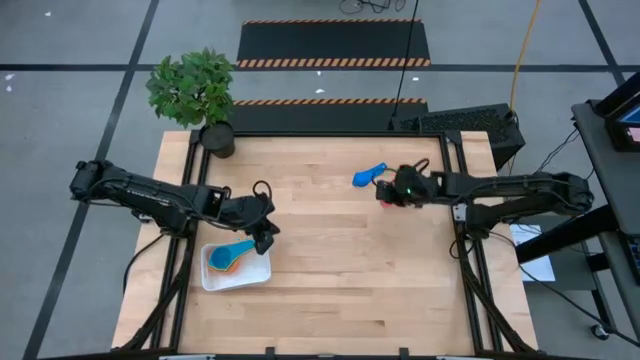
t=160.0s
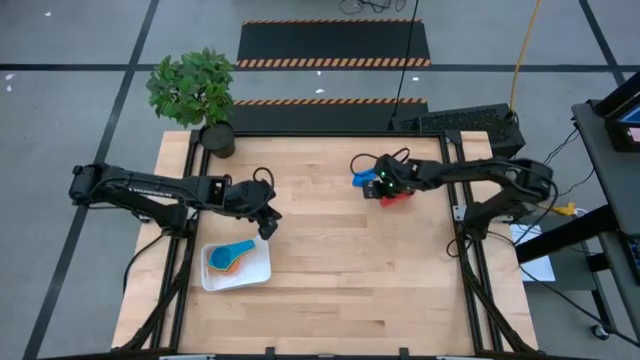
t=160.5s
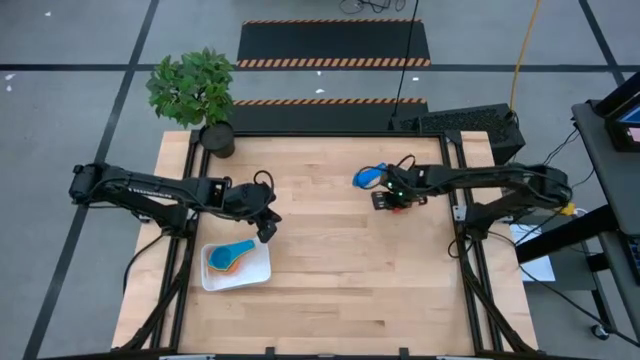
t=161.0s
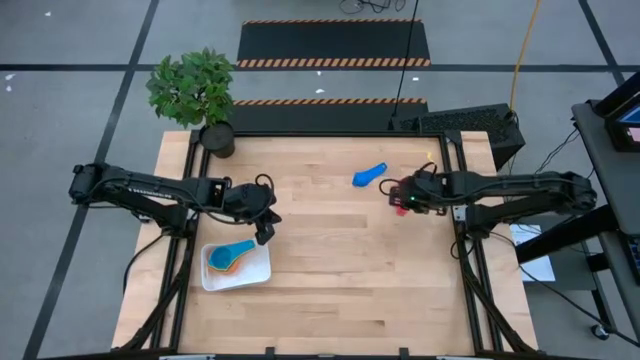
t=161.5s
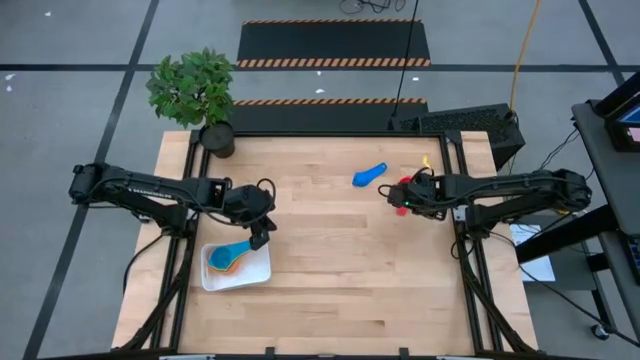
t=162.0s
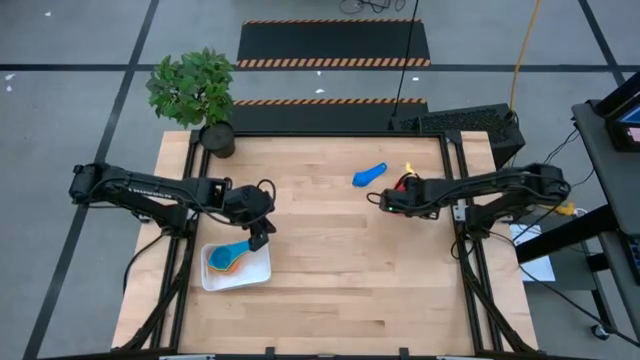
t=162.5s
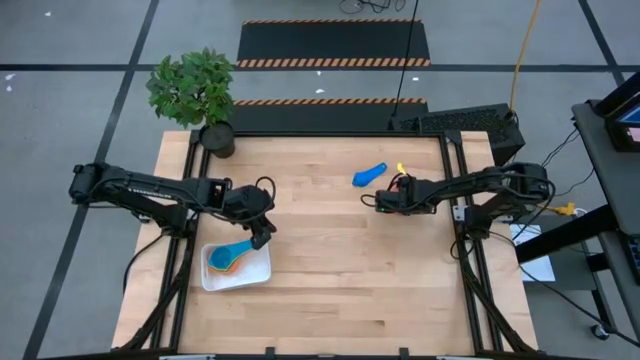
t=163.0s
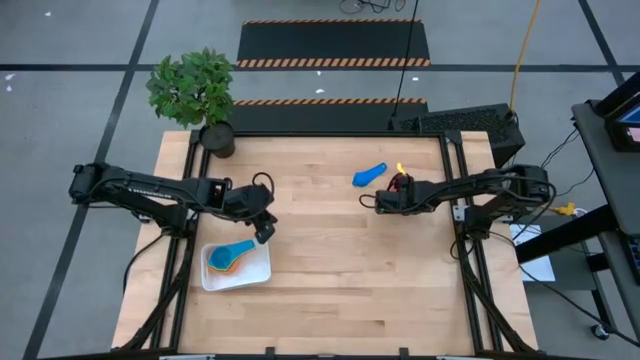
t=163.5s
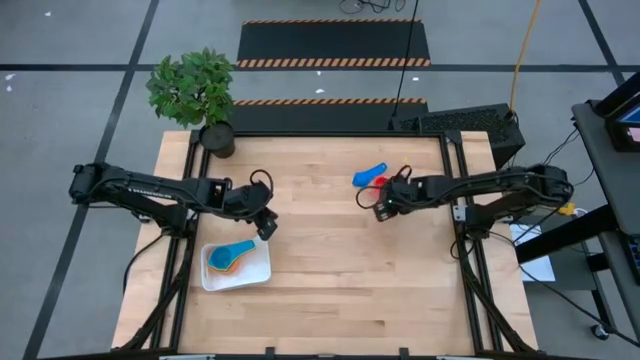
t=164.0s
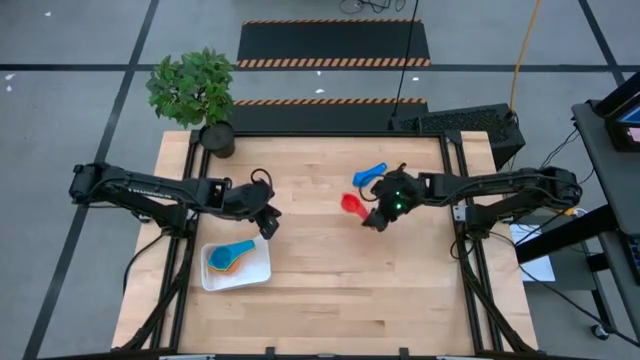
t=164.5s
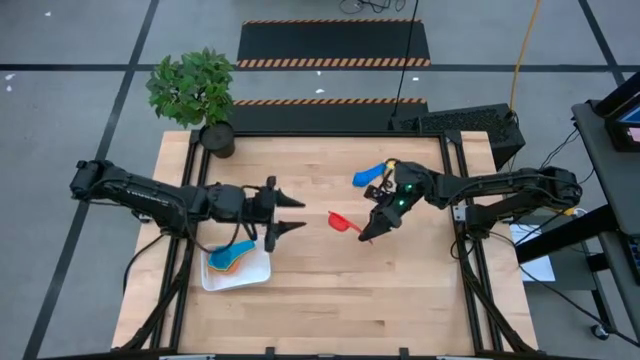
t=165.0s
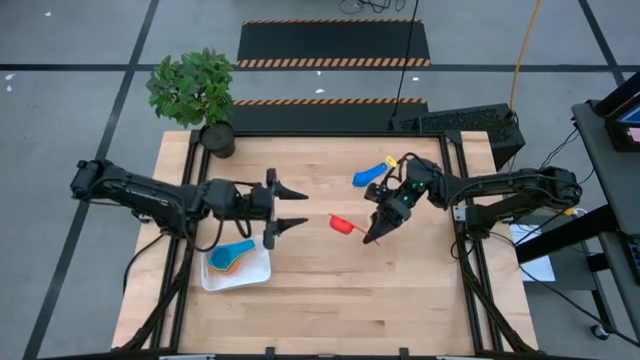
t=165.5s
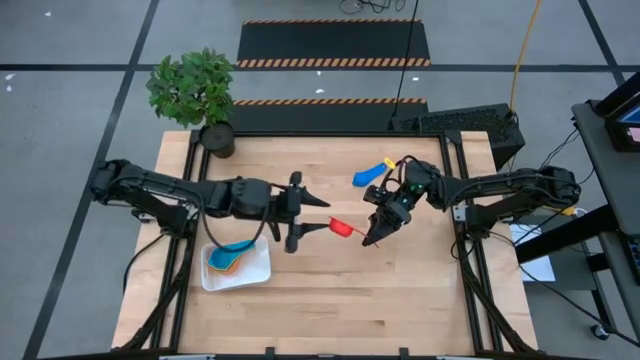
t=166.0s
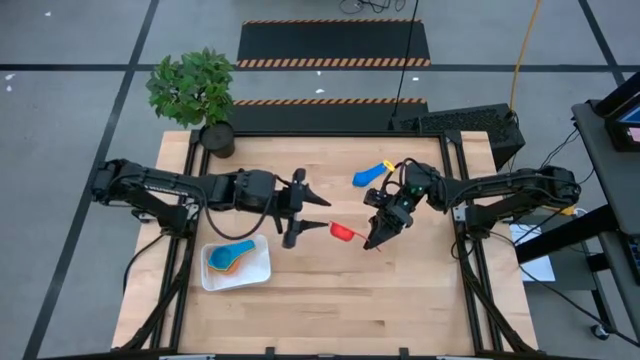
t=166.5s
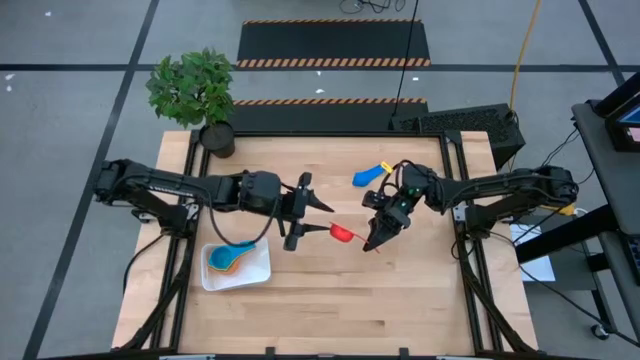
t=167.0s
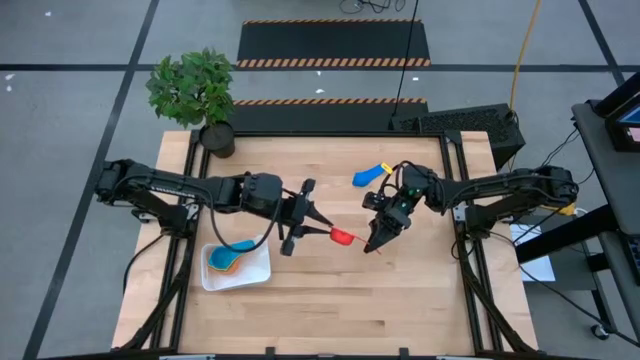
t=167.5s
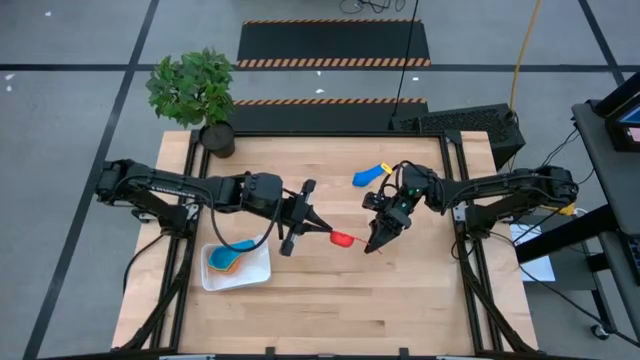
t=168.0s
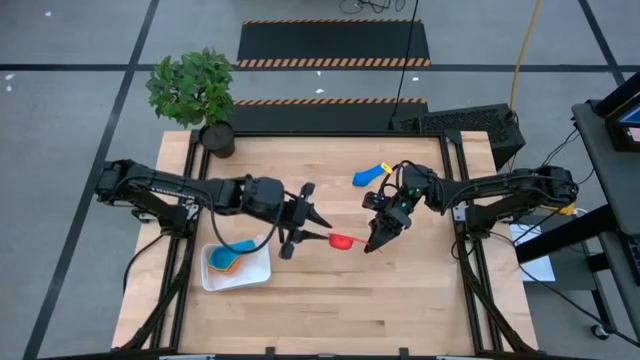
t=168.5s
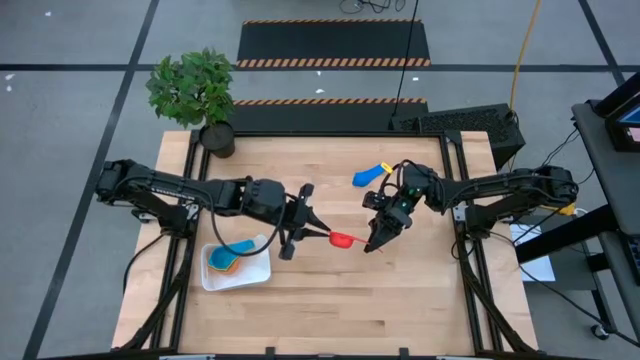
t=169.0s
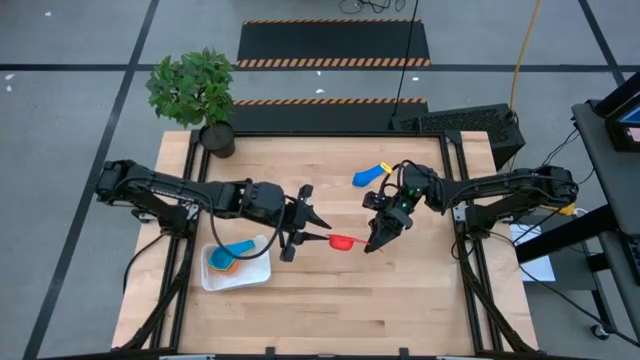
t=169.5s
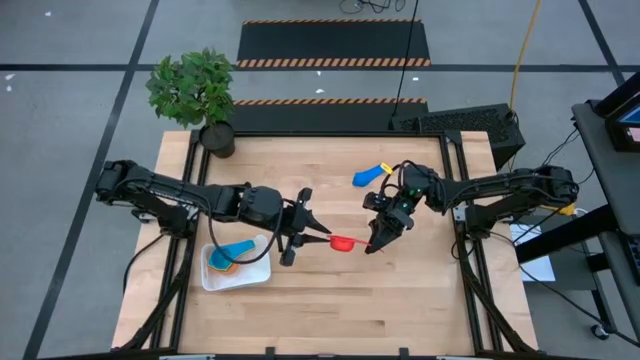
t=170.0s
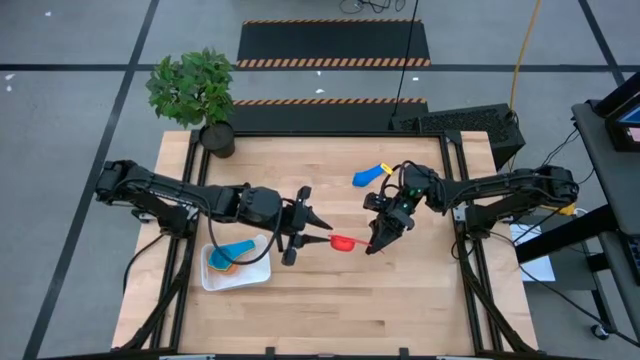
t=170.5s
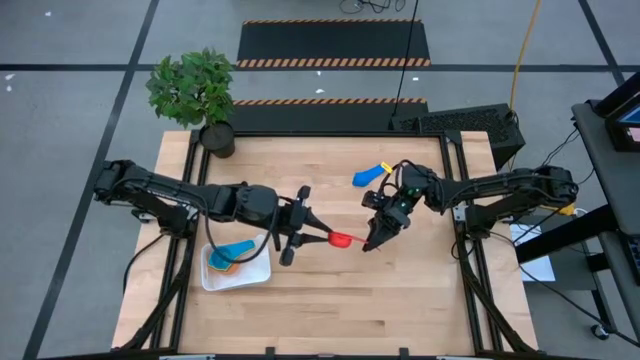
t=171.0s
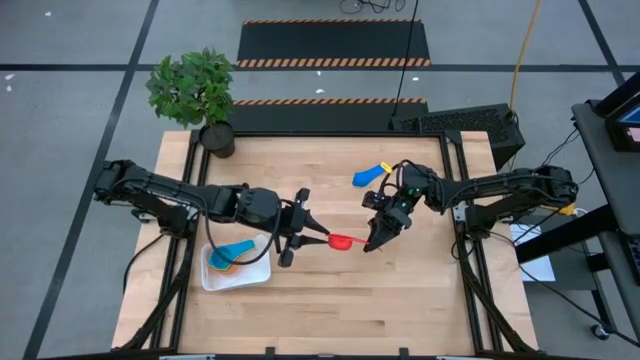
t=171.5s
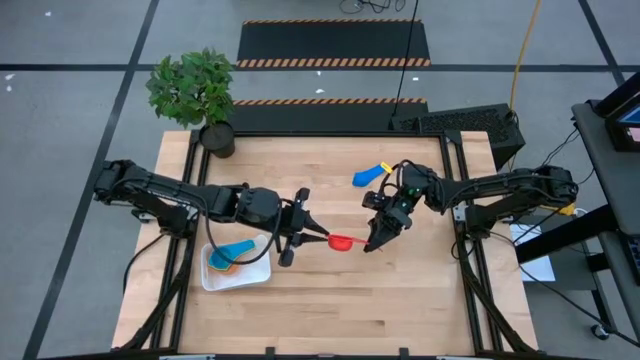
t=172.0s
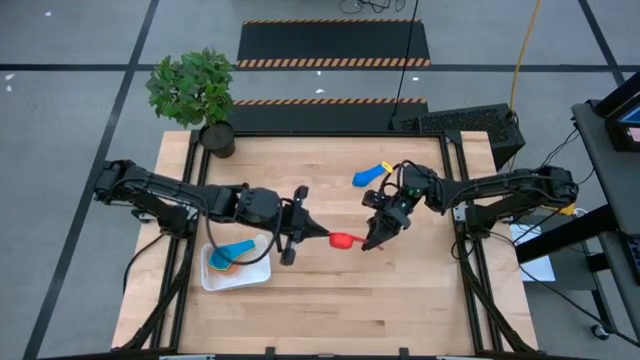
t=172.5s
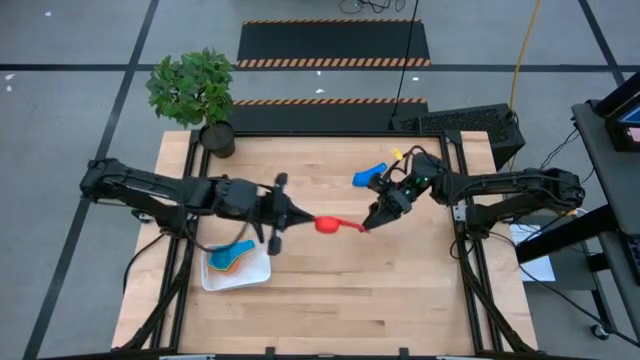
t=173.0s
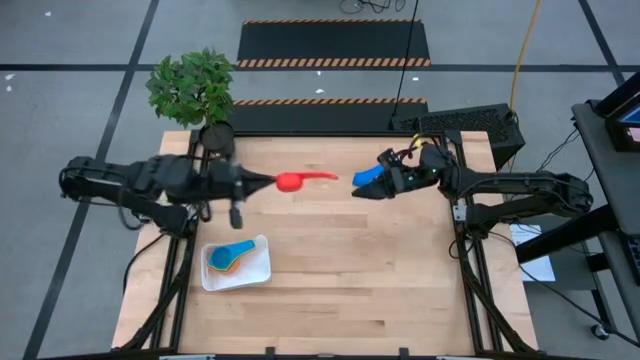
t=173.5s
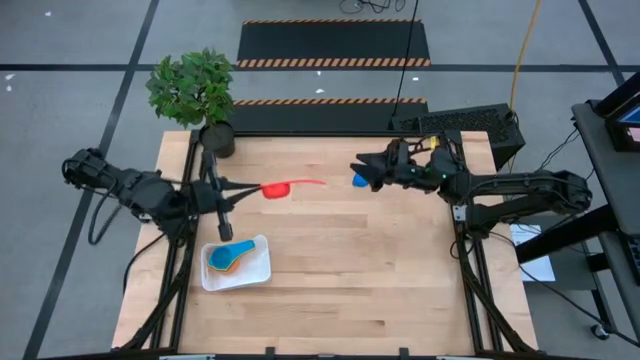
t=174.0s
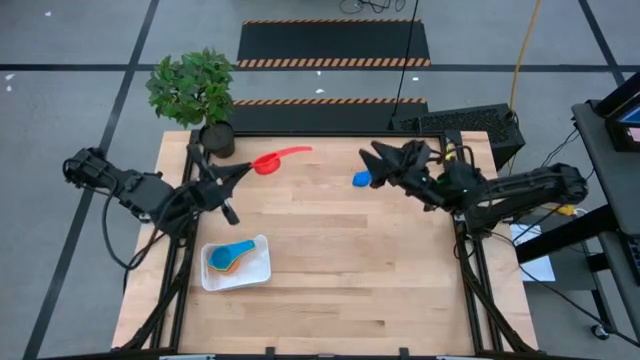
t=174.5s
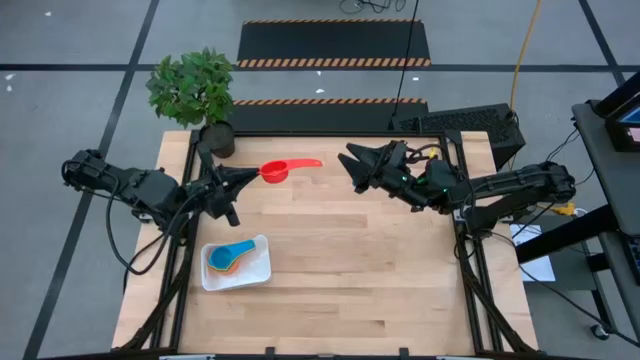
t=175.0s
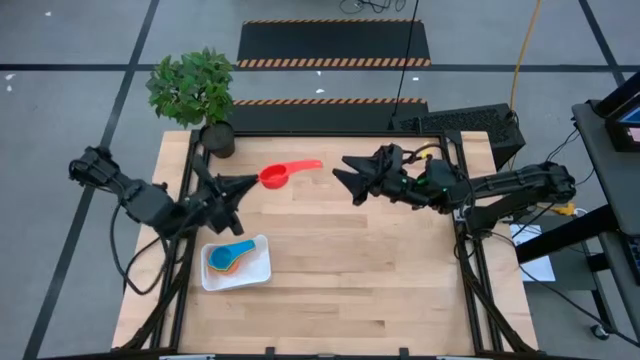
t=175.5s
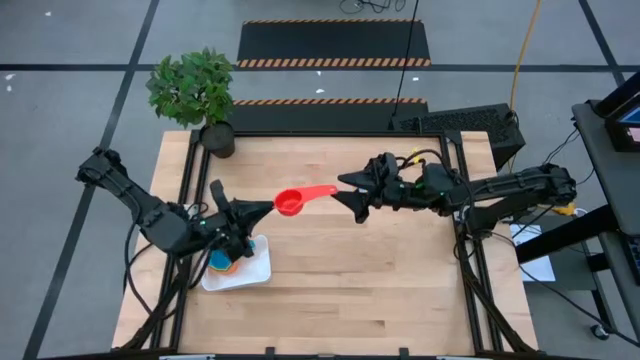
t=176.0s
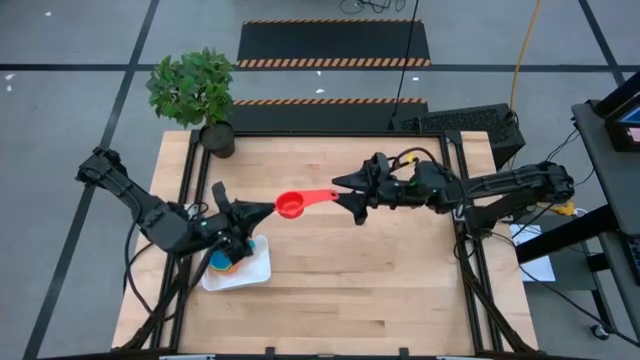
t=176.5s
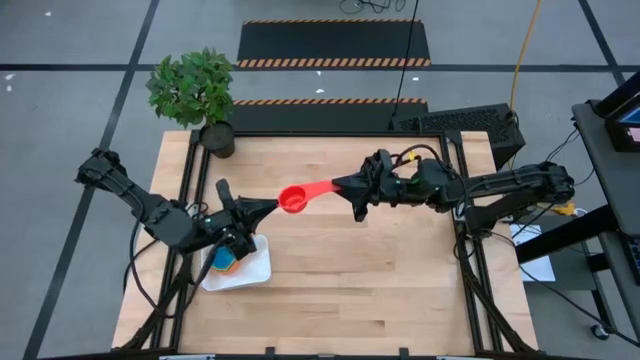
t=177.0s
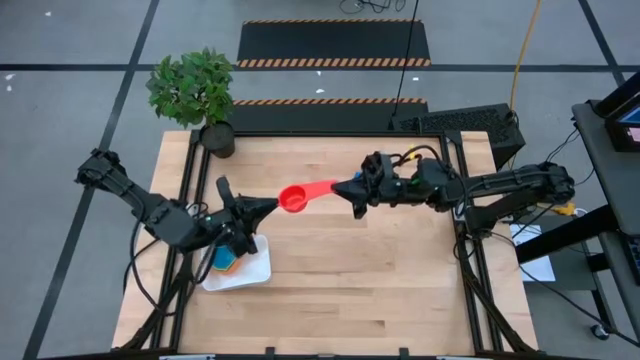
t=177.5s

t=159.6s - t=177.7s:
Task: Nest measuring cups in basket
Stack the red measuring cup on top of the light blue measuring cup in the white bin

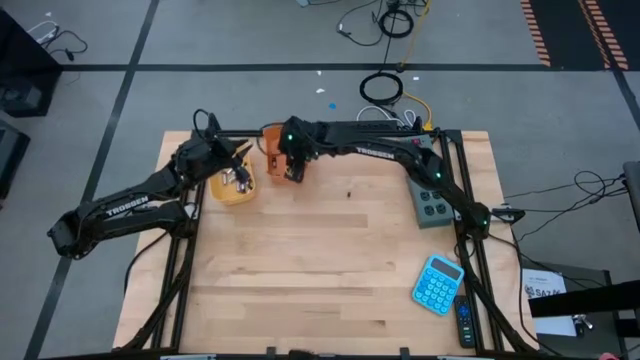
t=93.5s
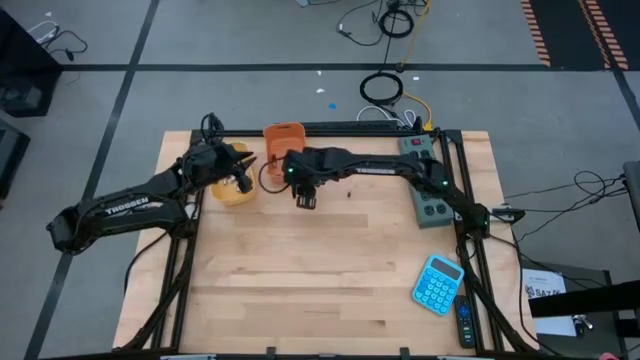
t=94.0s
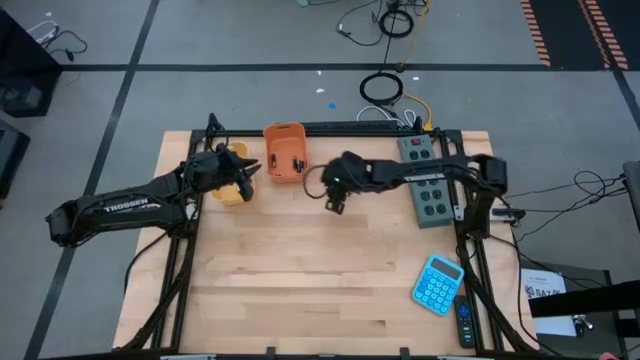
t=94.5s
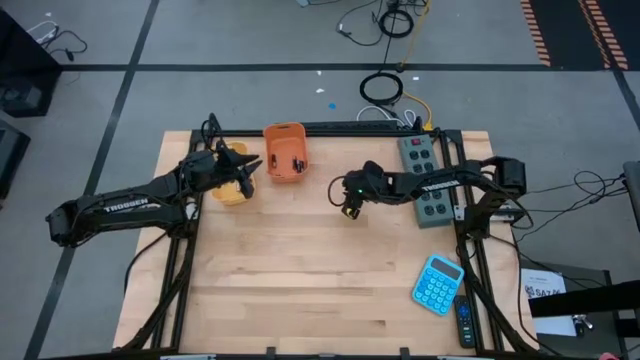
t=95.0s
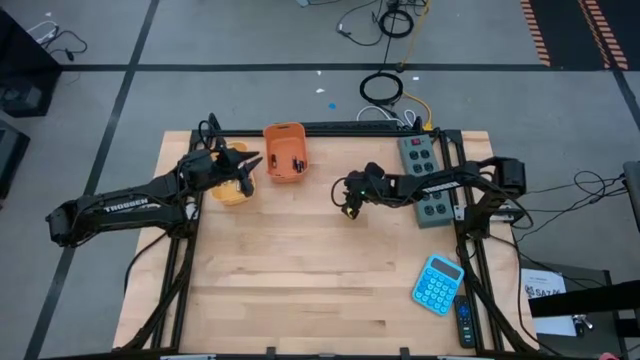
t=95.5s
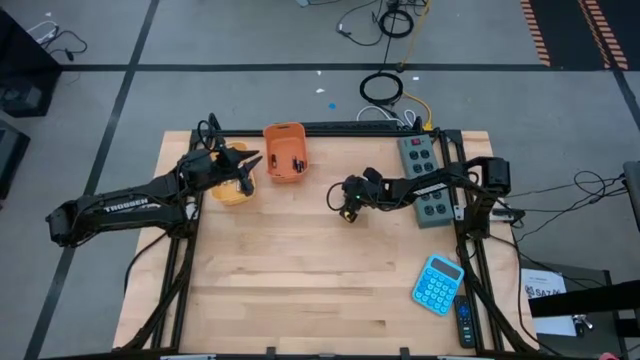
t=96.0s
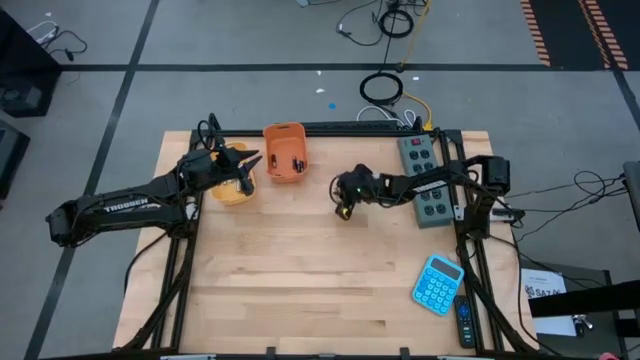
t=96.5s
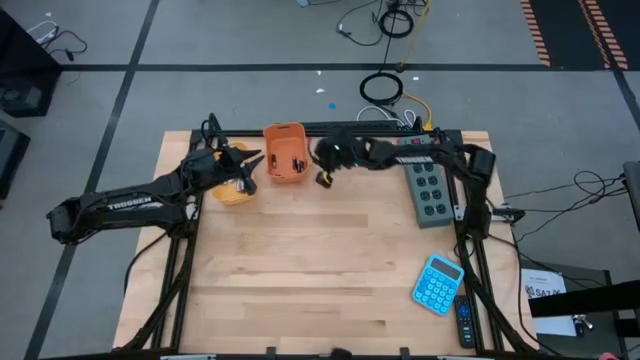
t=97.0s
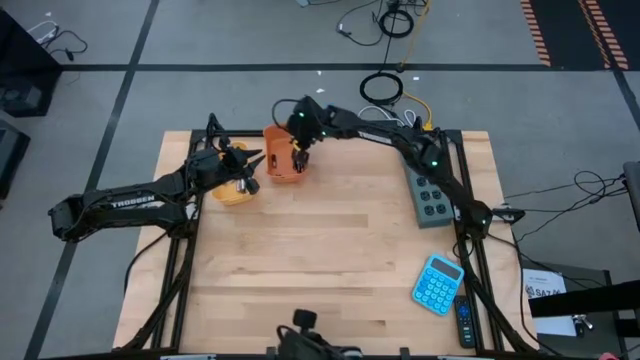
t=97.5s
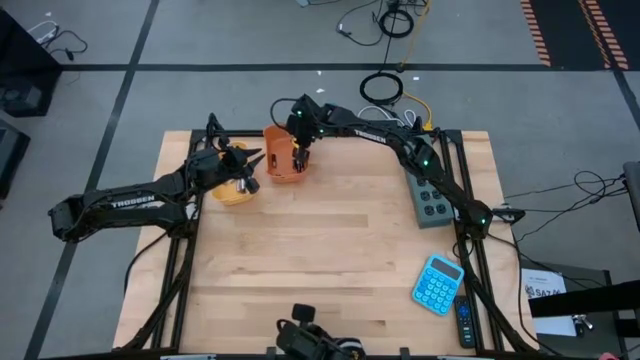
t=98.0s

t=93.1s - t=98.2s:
Task: Sort batteries
Put the black battery into the orange bin
